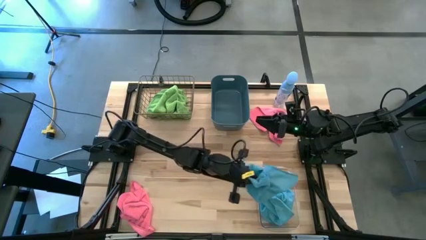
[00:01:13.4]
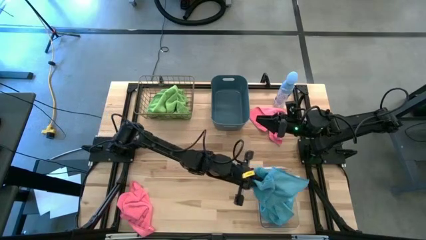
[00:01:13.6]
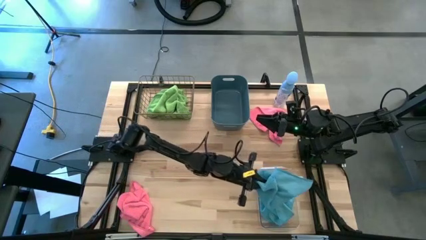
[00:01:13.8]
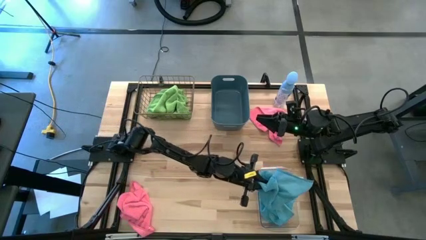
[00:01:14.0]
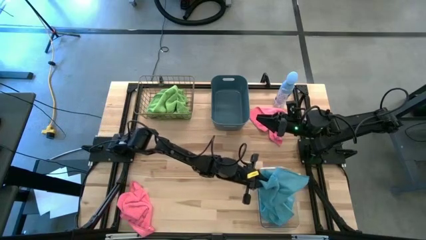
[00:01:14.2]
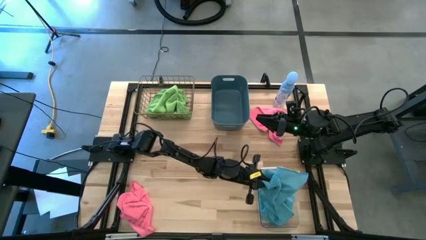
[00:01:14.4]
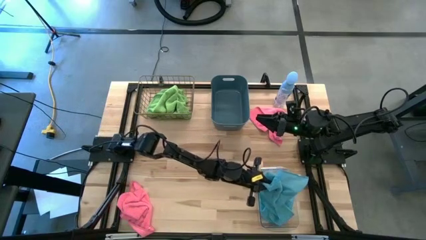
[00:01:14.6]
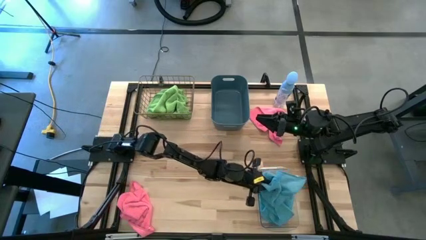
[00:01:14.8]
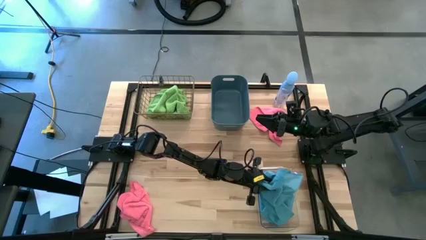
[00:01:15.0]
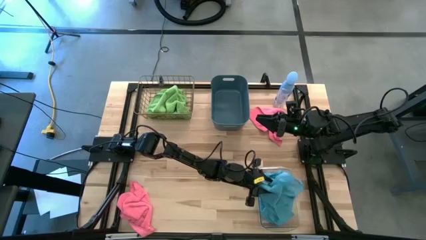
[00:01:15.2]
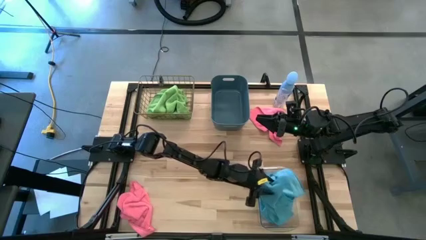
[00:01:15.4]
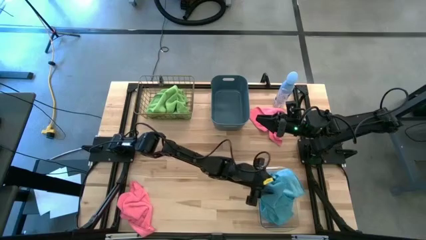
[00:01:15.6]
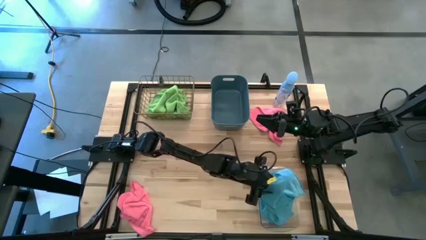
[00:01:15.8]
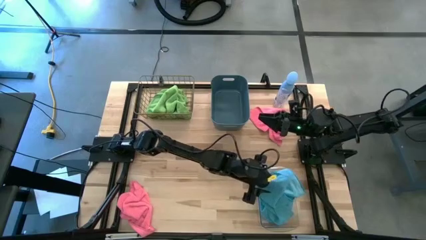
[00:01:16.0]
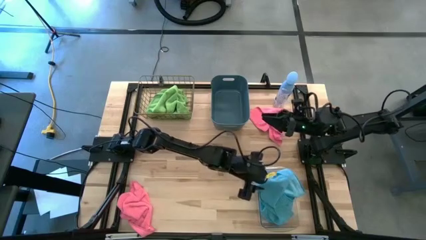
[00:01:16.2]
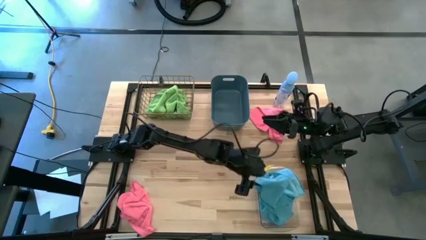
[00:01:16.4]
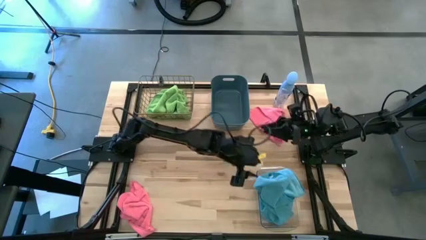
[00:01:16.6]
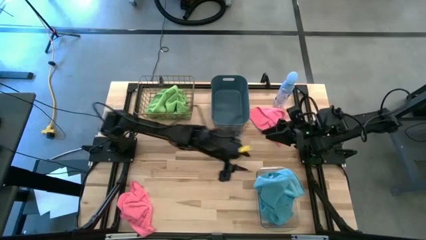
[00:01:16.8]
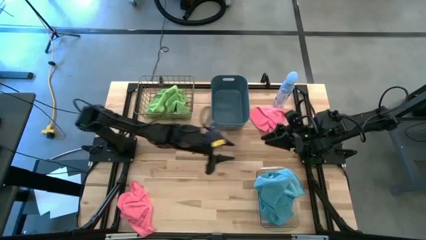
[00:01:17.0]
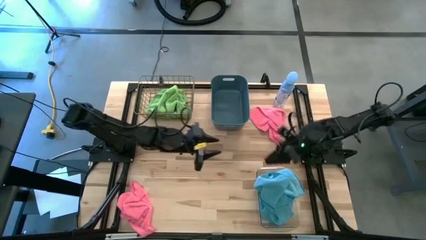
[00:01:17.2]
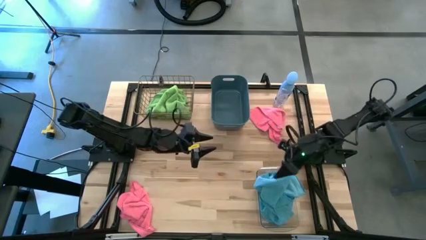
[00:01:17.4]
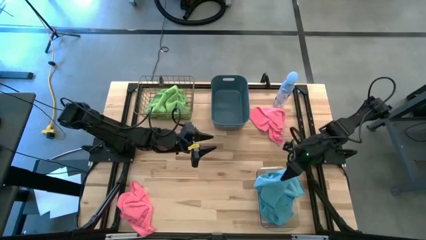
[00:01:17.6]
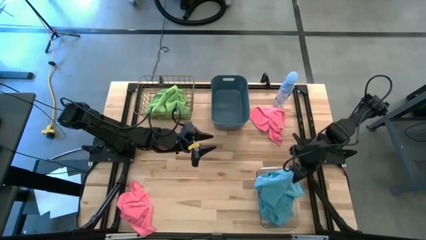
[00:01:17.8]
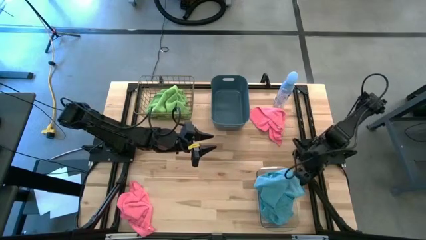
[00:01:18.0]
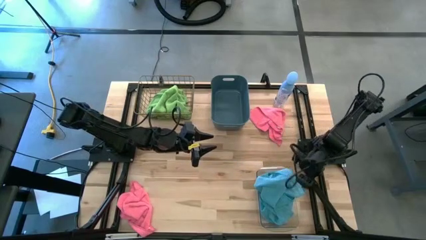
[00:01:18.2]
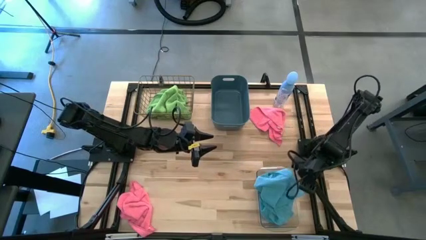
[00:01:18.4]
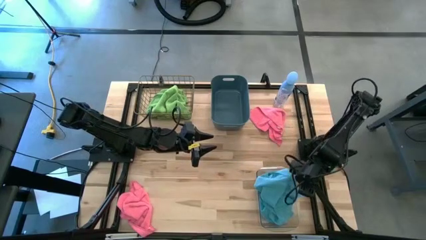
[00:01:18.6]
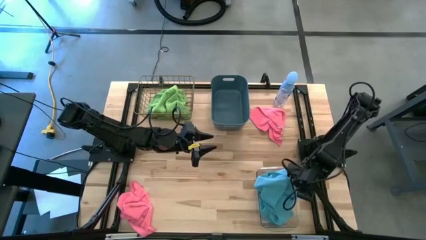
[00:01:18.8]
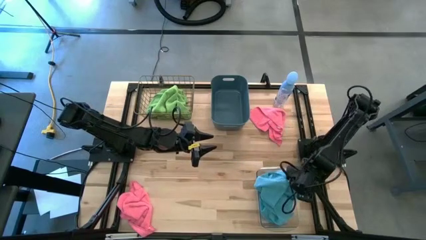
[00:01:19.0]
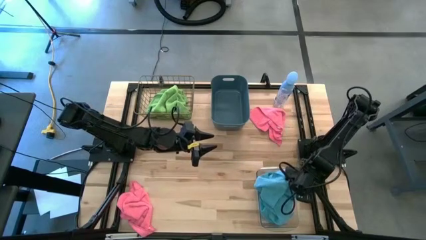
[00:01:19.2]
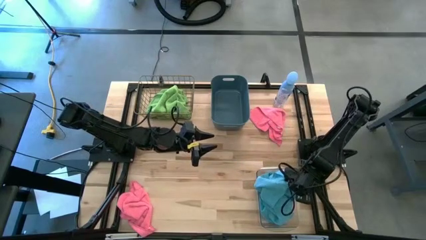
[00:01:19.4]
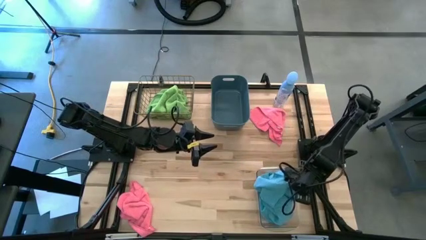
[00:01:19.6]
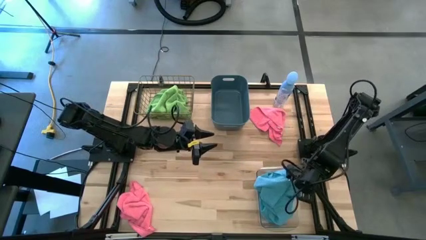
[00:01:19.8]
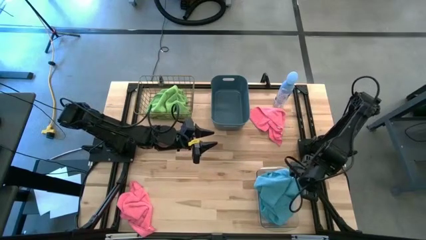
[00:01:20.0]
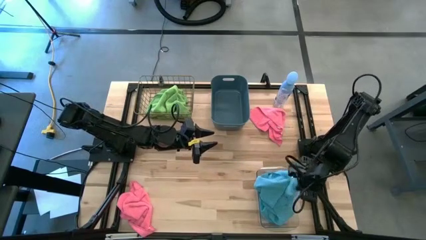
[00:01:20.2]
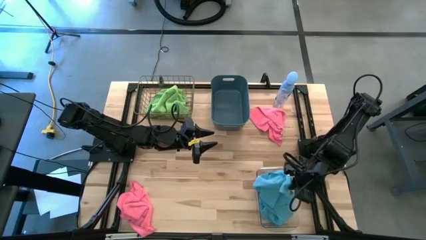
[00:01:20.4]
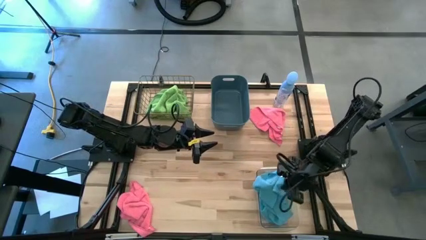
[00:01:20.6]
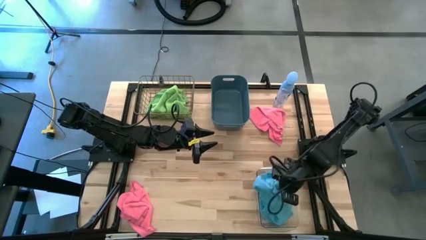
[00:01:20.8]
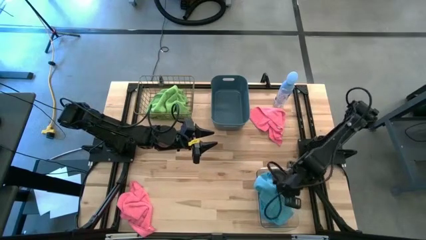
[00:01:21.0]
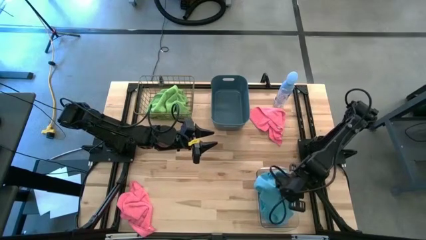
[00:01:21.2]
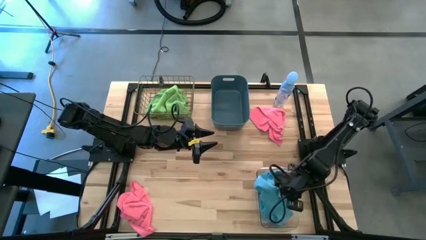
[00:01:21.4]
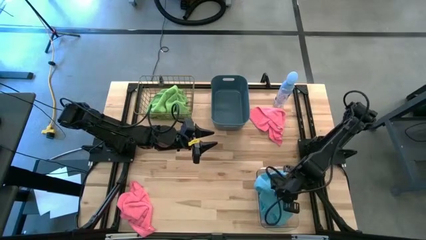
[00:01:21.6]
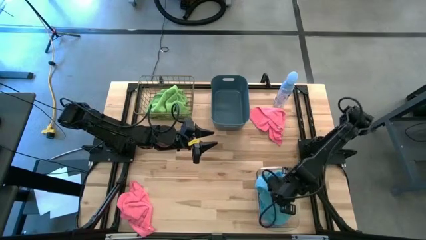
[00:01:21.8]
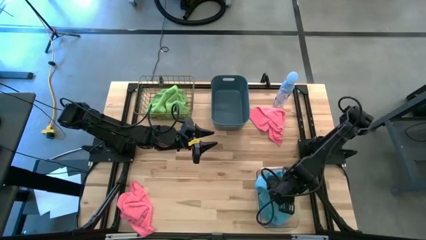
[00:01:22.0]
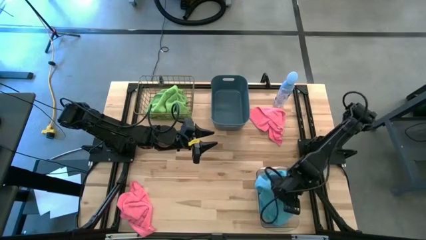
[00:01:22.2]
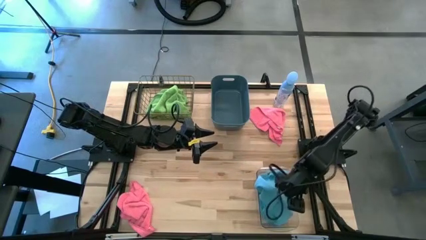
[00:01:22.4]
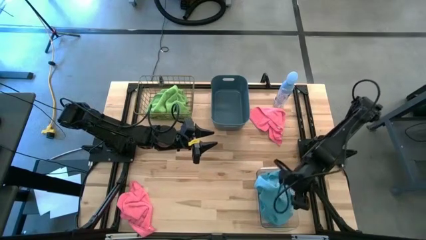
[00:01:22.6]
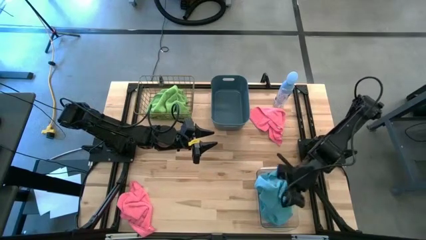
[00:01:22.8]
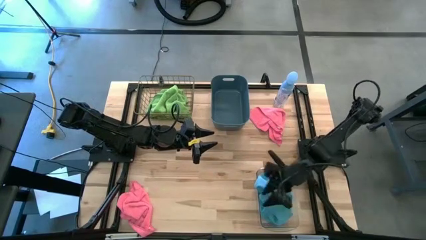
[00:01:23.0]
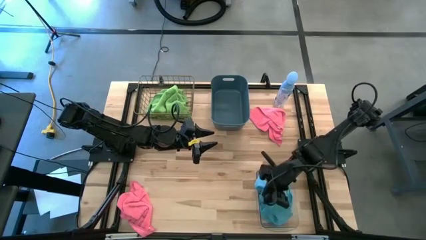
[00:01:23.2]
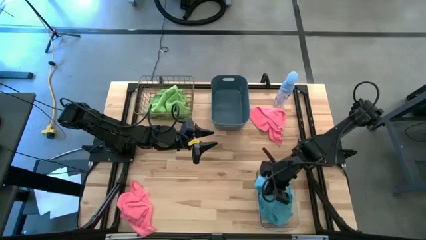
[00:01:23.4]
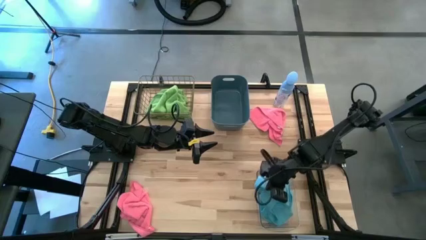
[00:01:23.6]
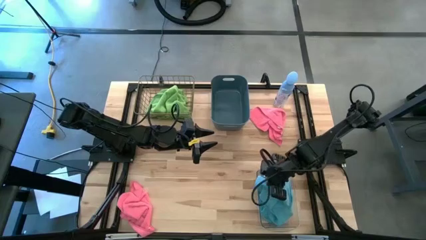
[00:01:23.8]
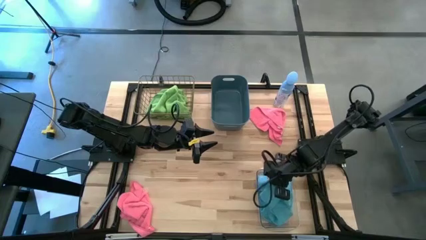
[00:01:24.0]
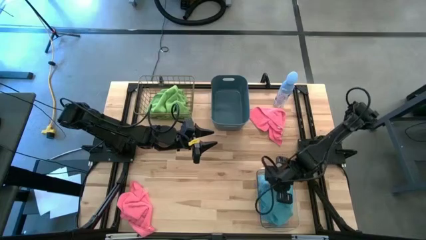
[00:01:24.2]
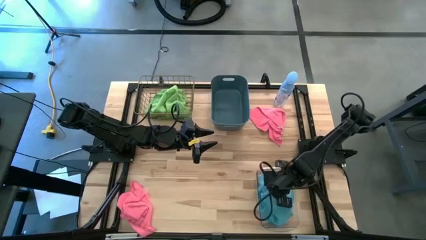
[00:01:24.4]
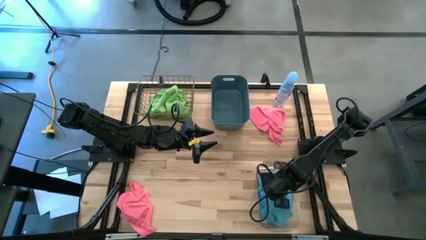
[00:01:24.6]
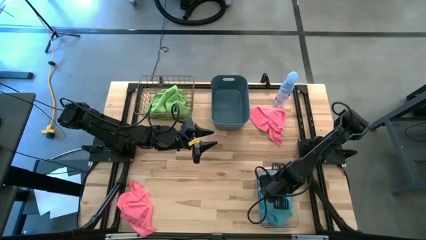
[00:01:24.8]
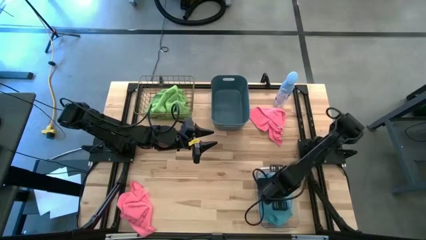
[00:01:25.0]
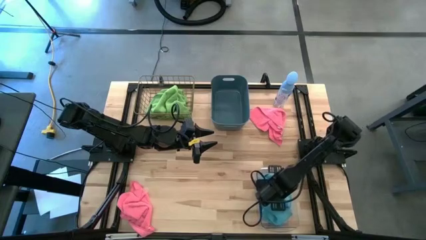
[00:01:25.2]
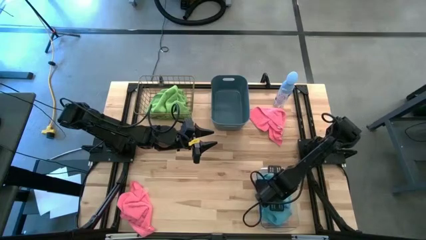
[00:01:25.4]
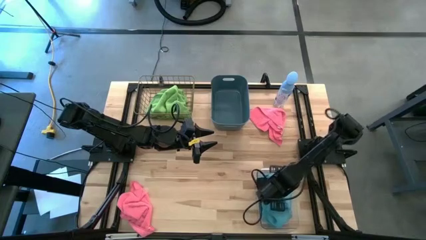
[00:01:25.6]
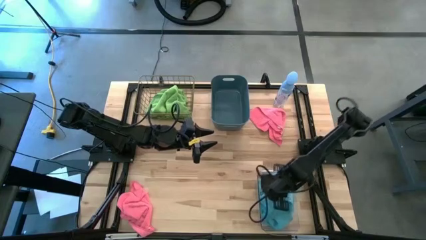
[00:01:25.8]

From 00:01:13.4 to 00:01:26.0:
Task: Sort microfiber towel by color & place in baskets
Put the blue towel into the transparent bin

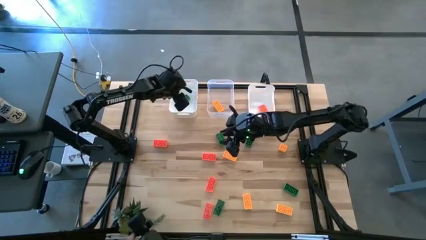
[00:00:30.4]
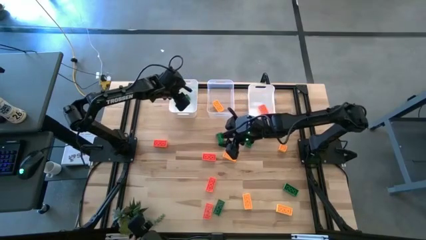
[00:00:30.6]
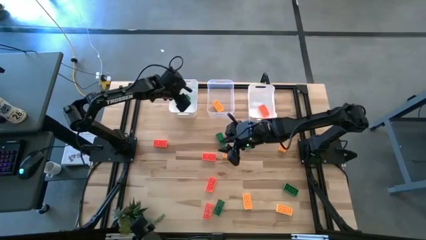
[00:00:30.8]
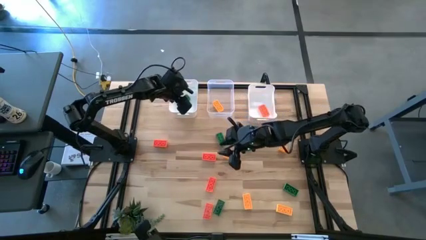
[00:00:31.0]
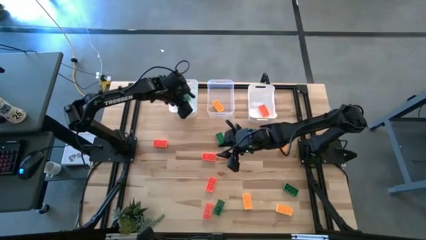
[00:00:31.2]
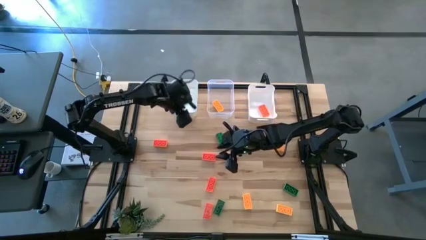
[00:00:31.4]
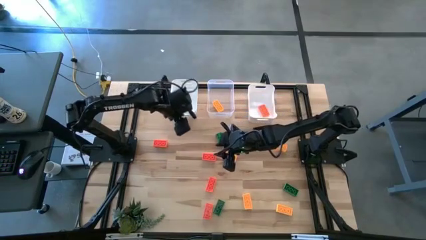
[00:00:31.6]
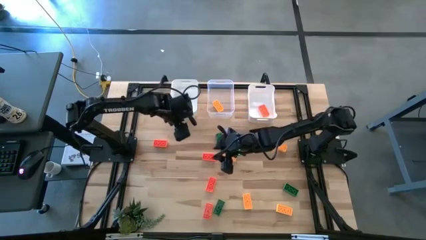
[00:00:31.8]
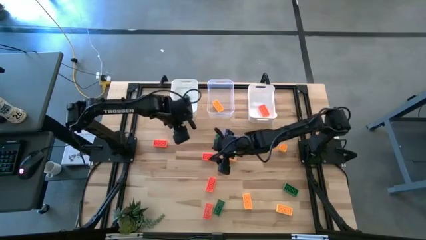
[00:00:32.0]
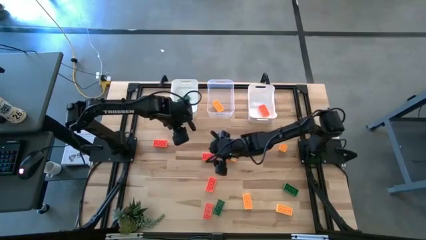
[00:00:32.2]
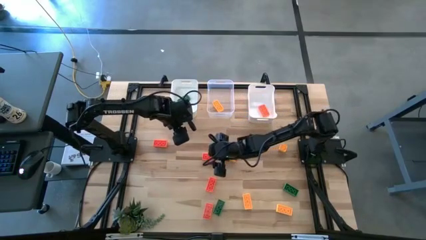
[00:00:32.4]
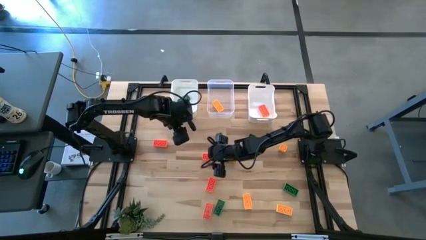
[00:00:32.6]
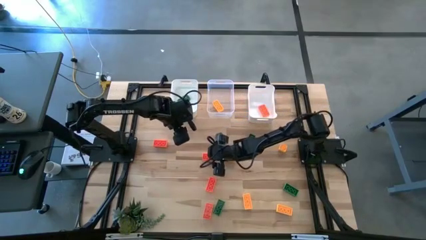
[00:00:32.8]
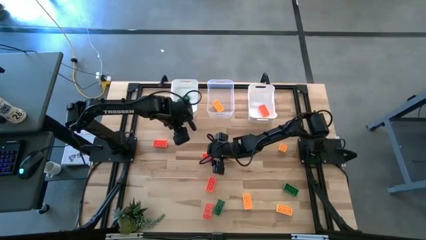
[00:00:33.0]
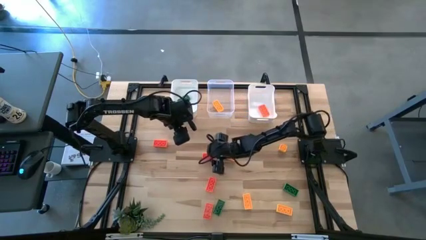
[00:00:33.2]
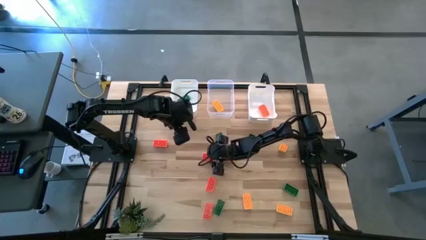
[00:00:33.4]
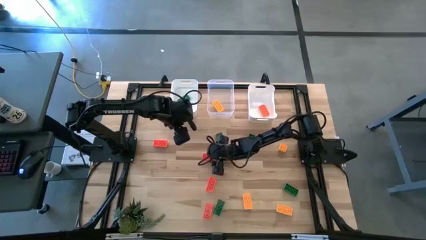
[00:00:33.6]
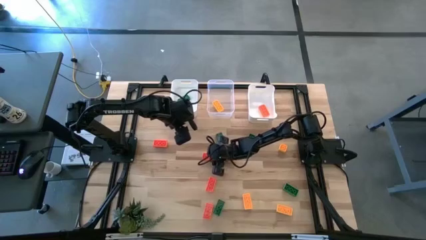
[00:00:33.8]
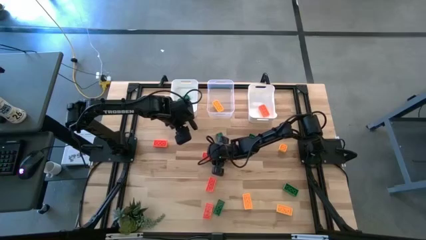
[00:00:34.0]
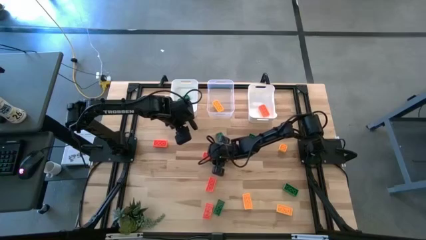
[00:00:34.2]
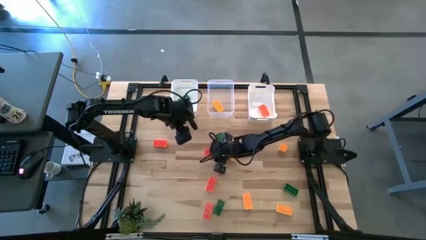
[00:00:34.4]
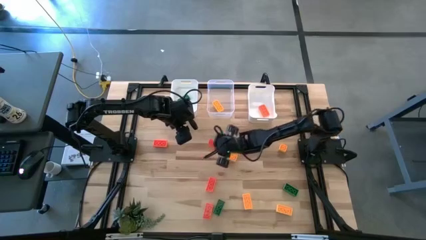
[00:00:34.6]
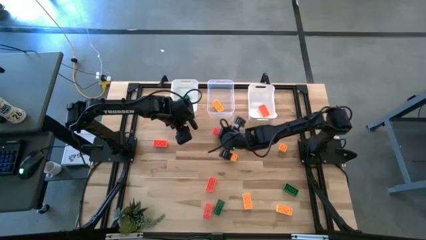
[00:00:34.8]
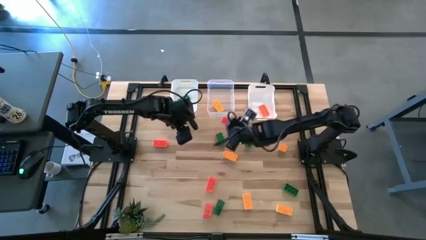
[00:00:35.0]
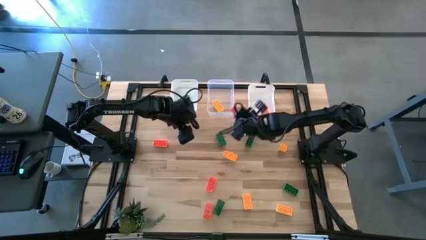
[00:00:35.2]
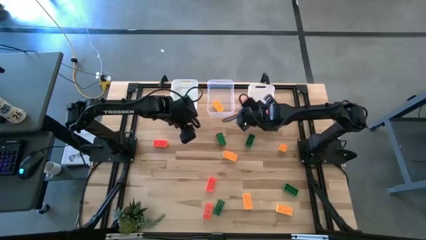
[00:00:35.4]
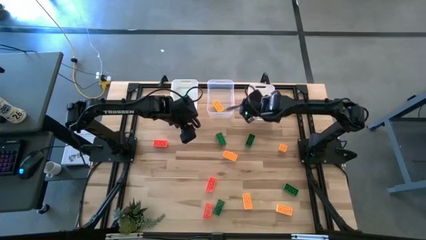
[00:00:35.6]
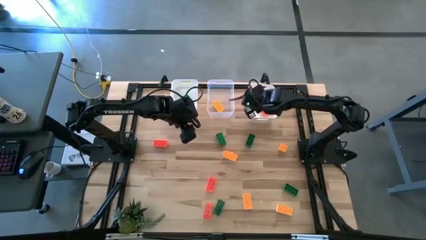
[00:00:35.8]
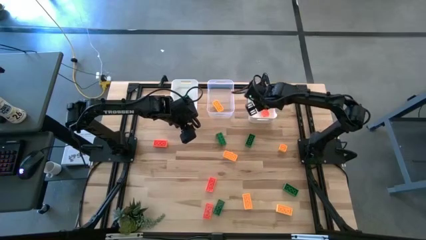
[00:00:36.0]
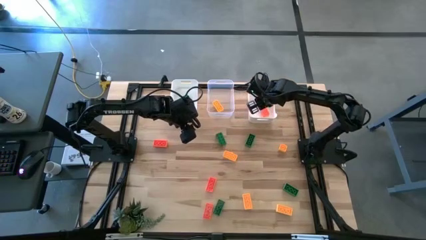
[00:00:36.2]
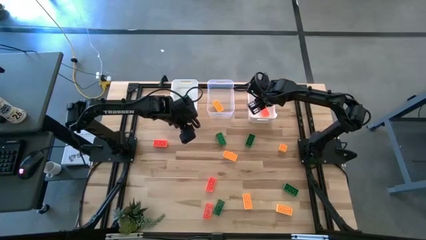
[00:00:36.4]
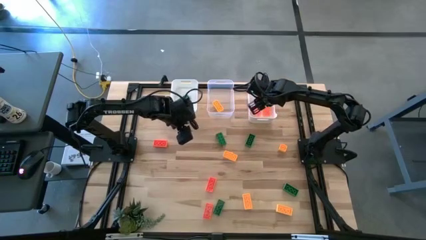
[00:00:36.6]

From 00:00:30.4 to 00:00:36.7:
Task: Sort & place blocks by color
Put the orange game piece into the right white bin
